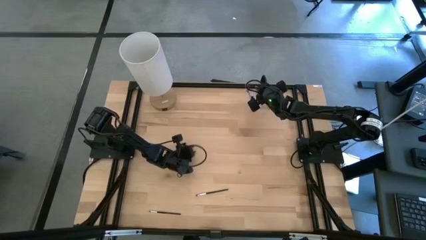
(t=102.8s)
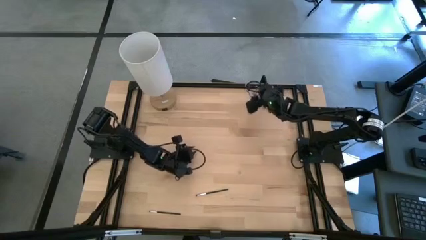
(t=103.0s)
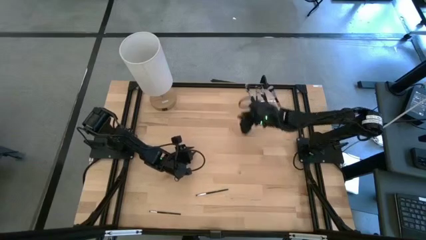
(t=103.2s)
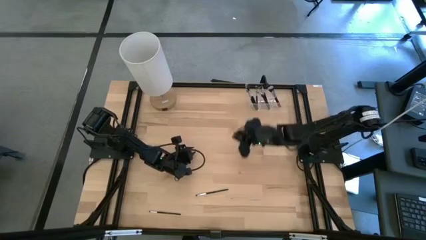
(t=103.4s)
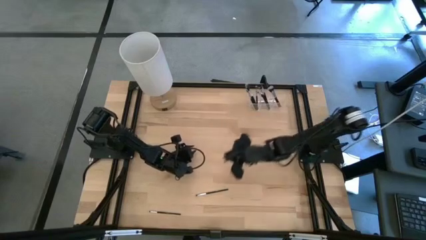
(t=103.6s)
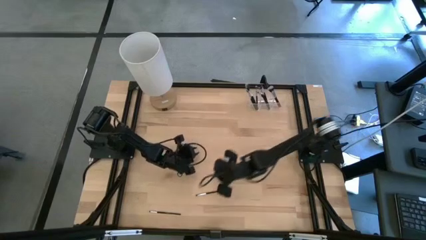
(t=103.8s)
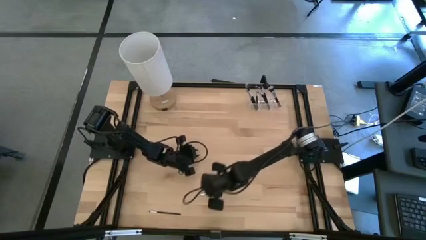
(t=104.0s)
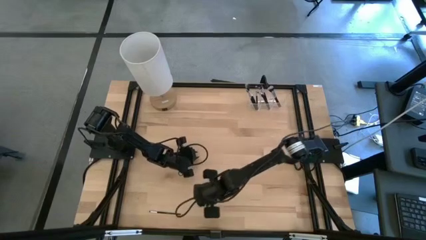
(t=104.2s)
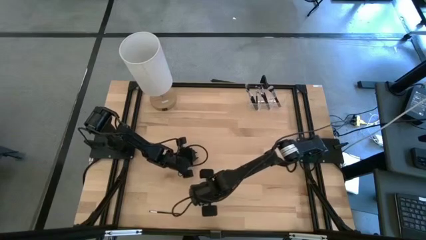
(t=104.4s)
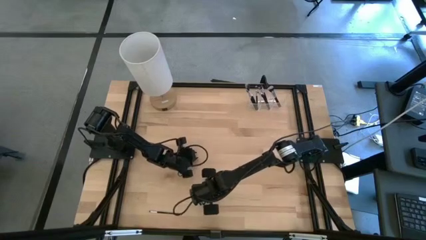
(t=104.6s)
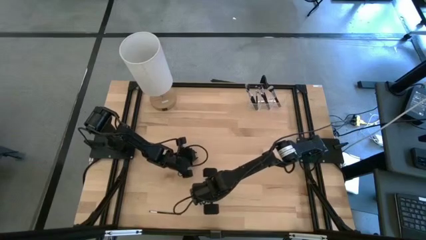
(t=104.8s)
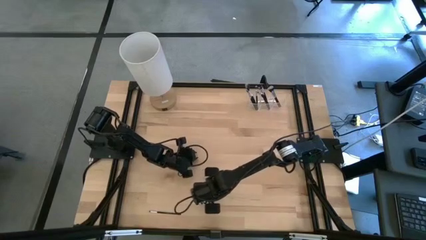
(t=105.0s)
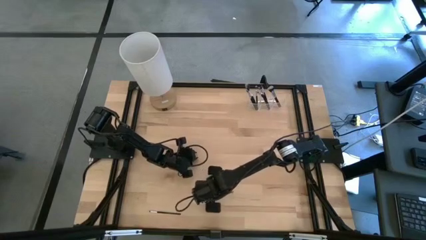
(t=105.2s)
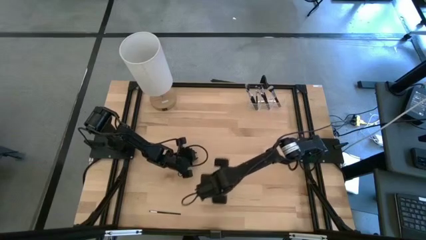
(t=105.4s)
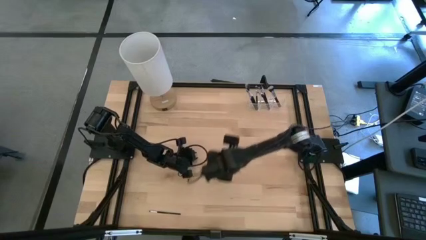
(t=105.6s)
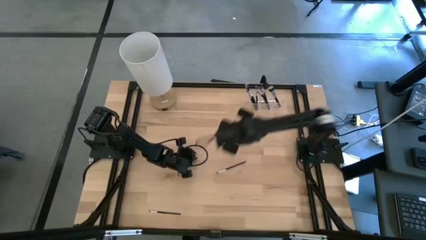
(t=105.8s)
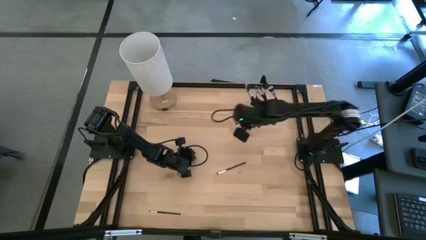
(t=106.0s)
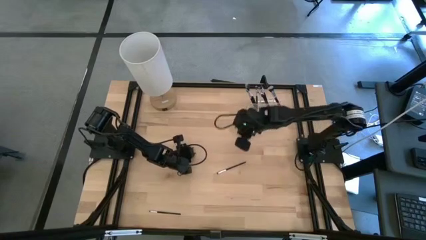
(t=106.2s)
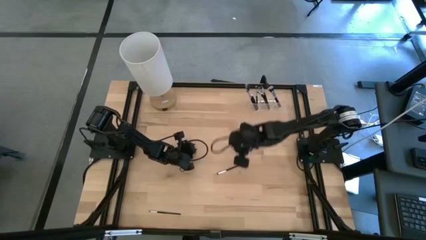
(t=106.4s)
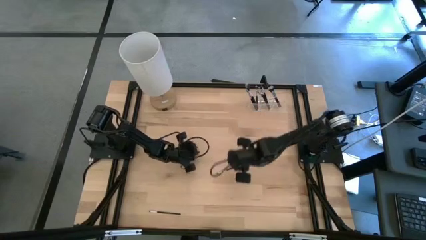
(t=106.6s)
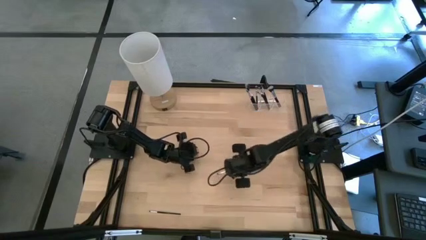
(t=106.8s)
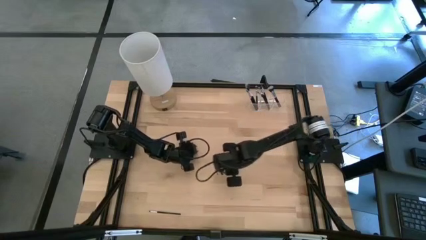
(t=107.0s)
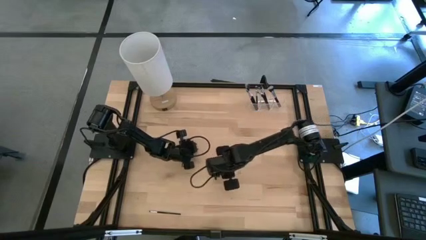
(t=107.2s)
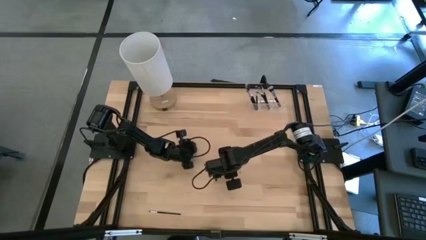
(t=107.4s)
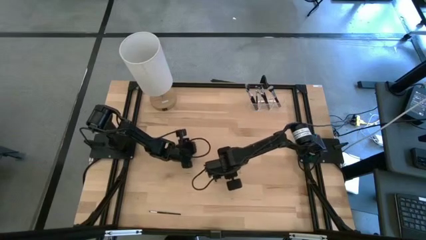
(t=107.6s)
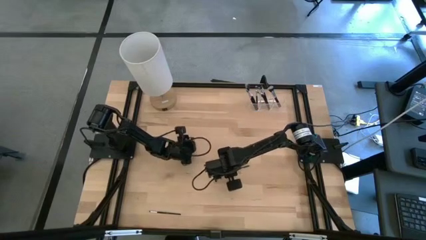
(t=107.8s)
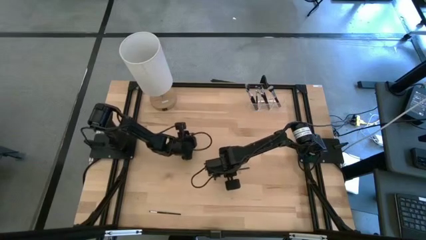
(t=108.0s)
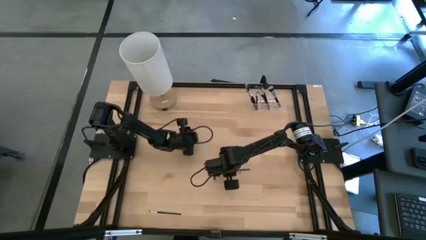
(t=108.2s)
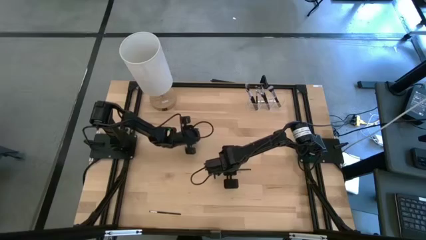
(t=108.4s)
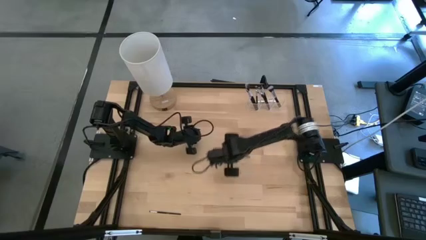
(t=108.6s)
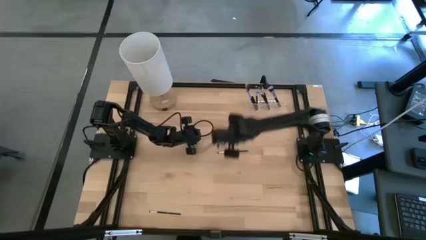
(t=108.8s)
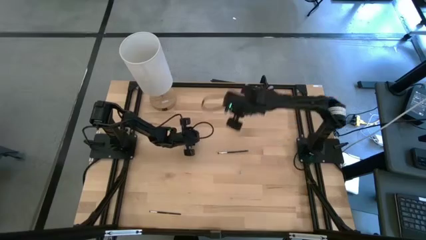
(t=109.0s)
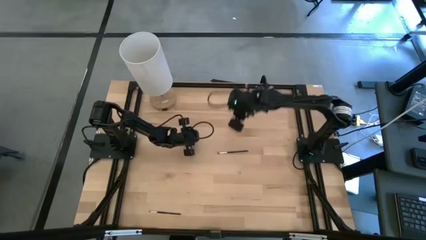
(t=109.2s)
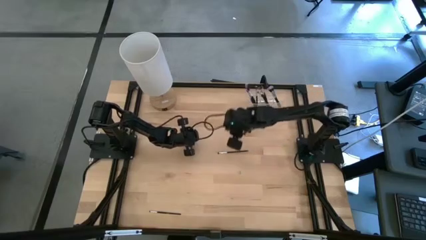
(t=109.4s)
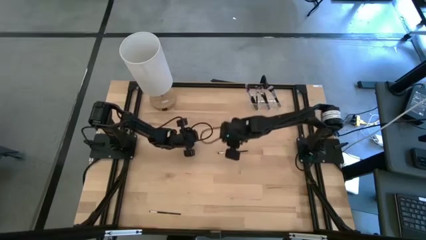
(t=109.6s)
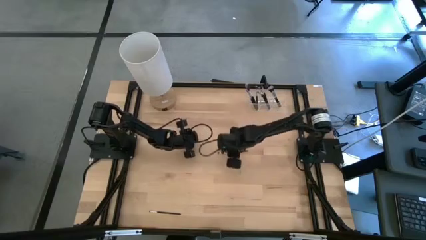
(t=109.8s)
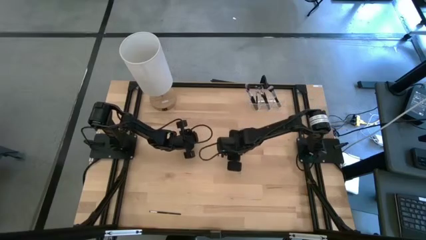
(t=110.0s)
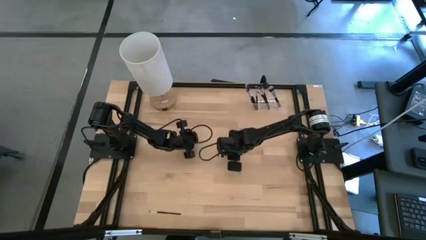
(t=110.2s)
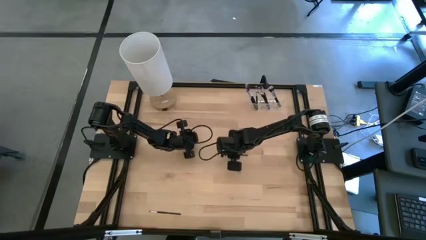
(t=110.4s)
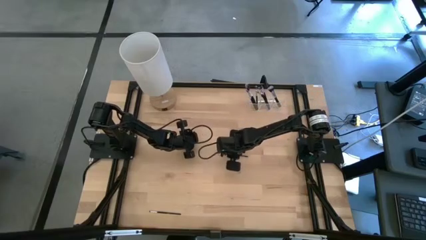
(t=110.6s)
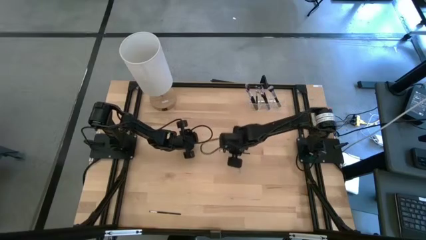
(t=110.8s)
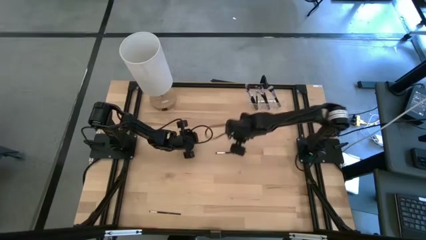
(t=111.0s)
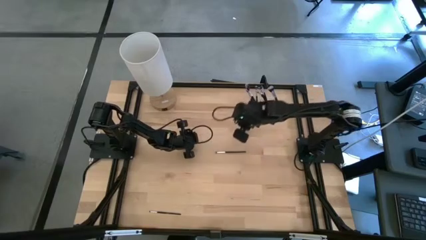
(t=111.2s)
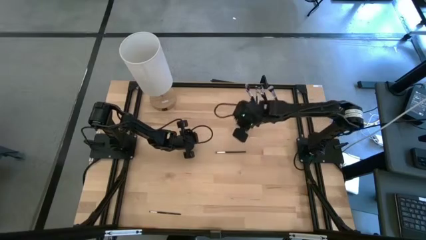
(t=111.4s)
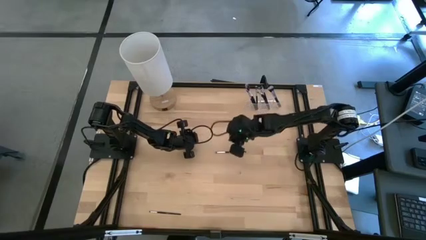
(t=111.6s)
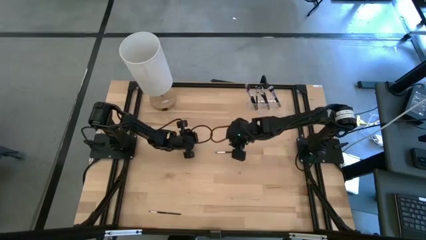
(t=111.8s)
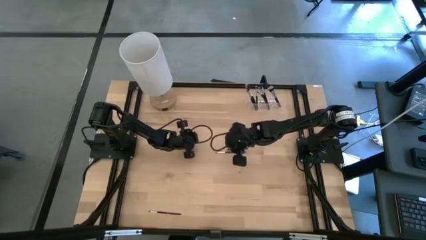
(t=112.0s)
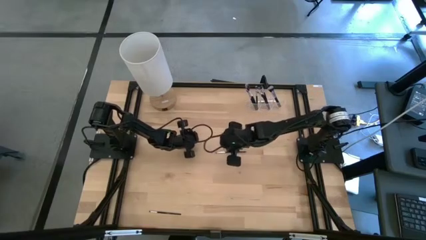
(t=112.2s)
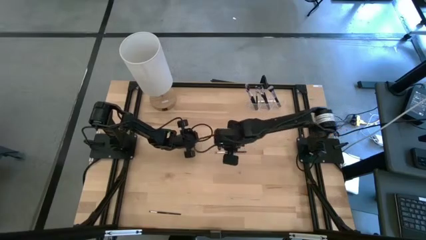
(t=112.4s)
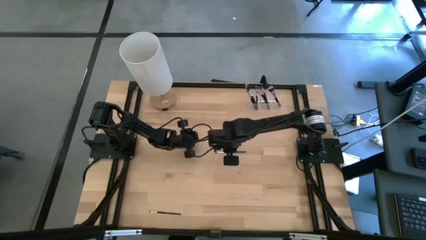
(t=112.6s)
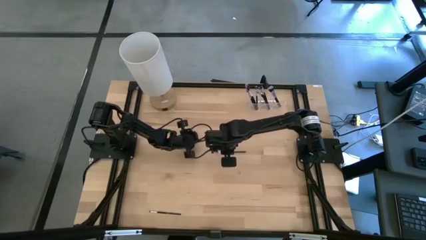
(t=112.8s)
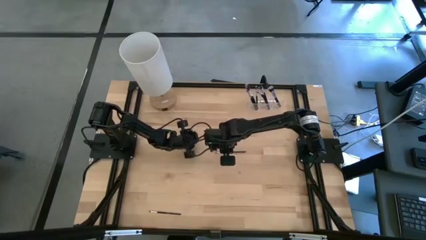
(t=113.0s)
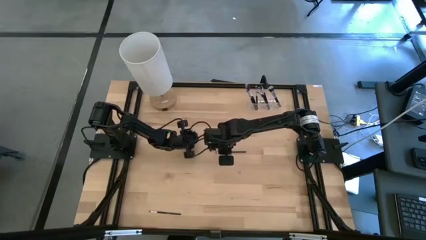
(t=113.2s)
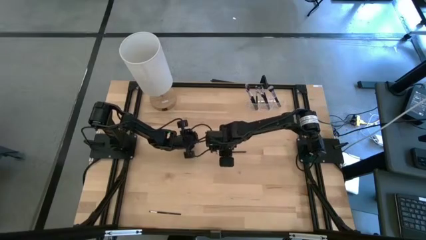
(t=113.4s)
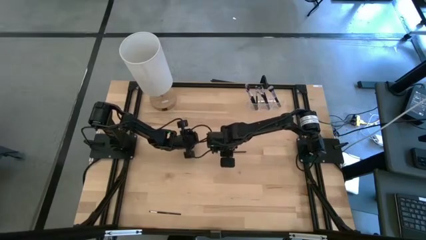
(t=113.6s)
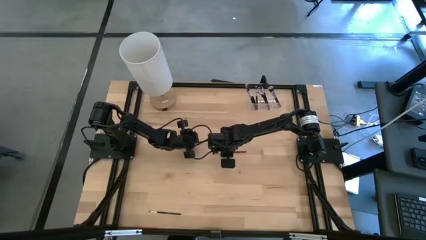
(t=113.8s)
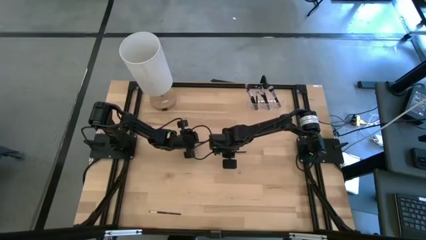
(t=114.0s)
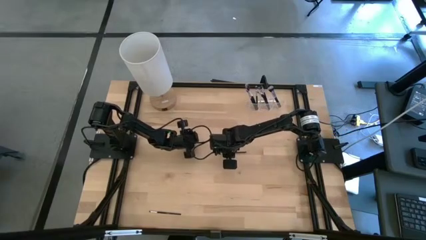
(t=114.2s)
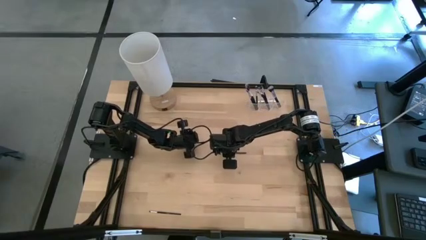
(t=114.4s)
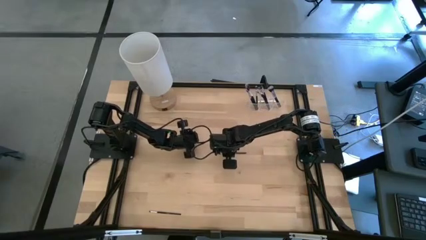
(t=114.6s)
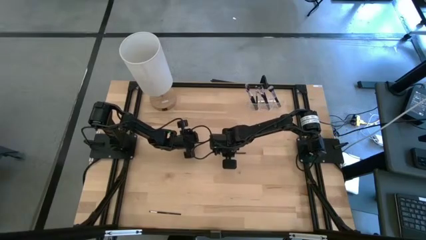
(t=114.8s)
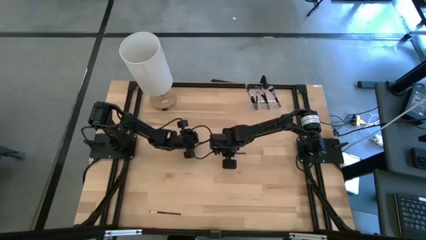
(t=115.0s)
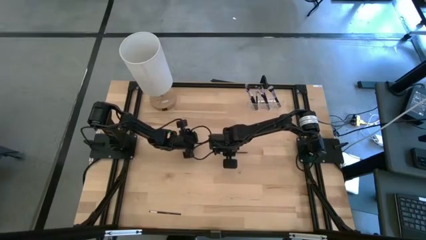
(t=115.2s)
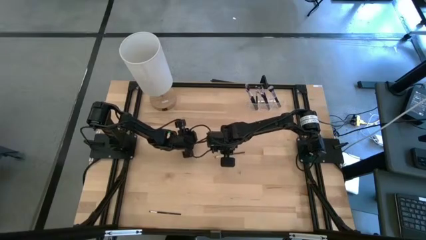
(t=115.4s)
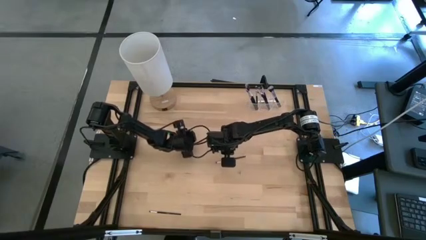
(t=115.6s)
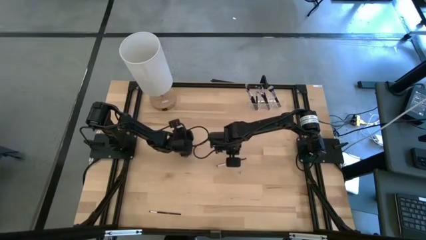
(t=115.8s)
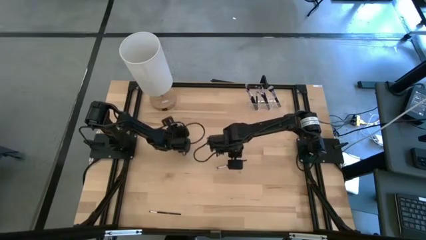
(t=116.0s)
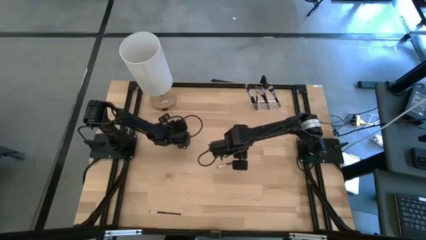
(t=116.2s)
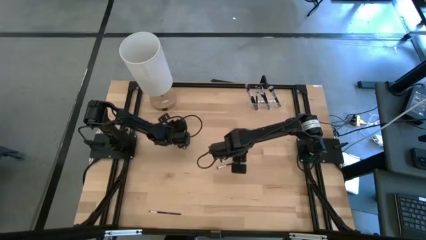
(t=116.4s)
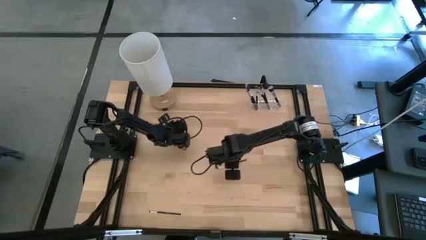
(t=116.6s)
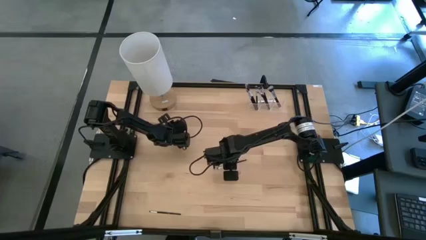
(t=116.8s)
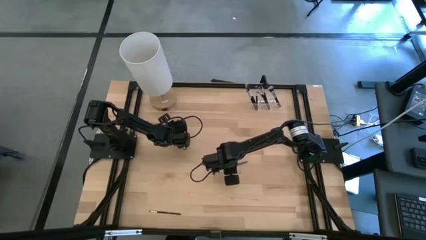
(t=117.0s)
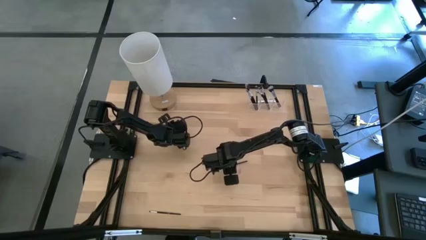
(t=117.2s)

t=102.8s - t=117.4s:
Task: Put items in baskets/containers
Put the eyeshadow brush into the middle of the transparent organizer

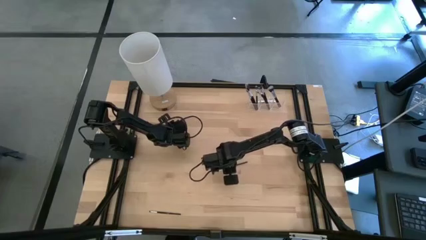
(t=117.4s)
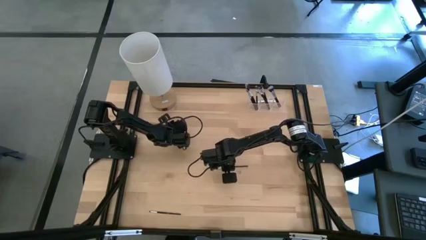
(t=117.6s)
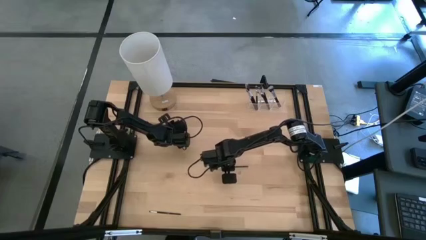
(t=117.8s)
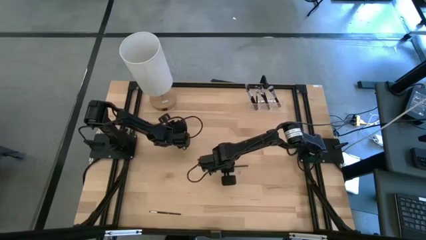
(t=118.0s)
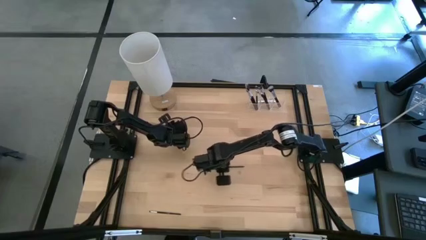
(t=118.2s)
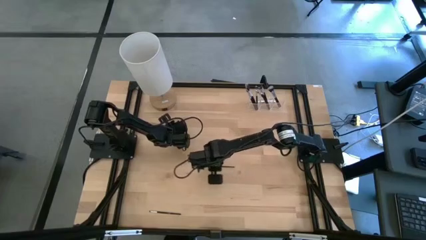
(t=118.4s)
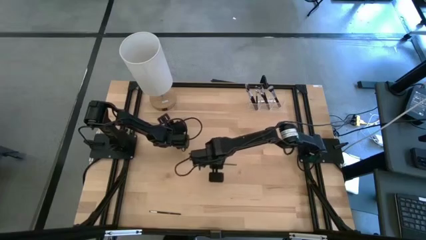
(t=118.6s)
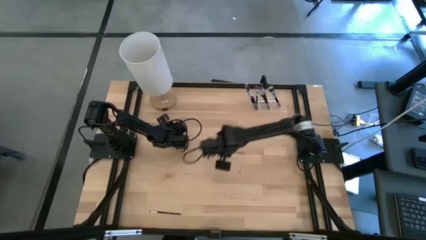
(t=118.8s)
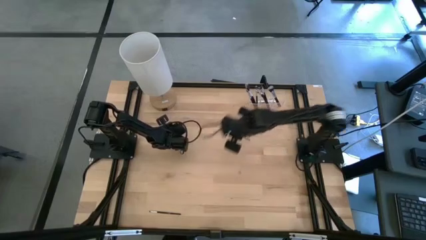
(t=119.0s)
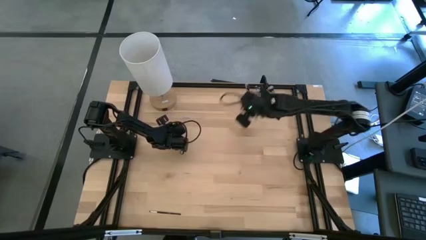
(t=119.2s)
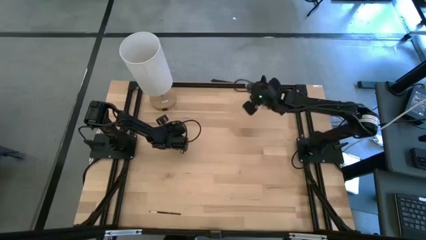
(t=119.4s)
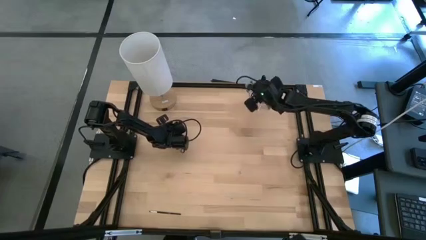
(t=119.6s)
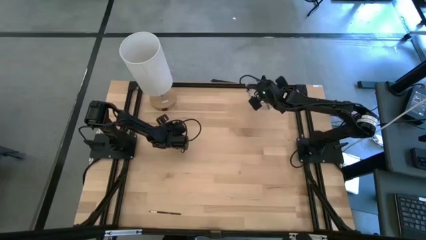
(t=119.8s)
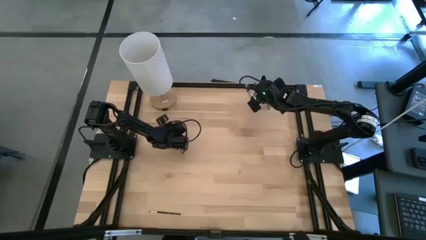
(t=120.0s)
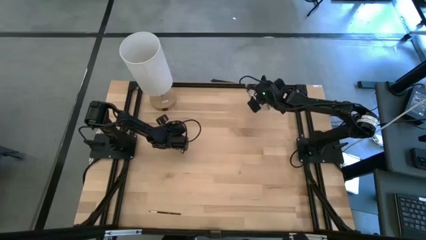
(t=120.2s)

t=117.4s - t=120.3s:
Put the eyeshadow brush into the middle of the transparent organizer
